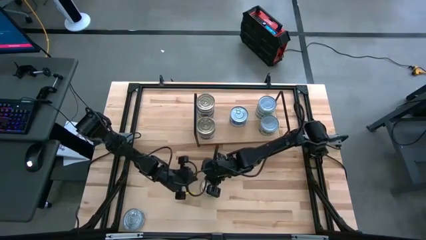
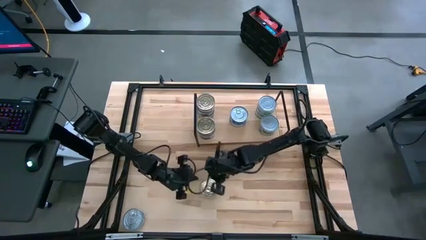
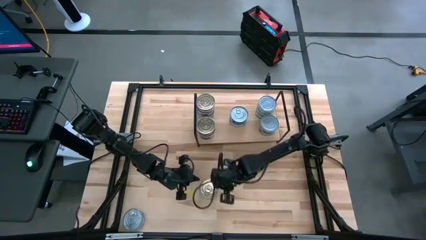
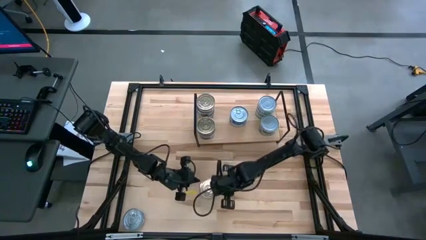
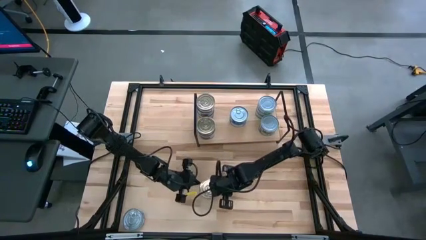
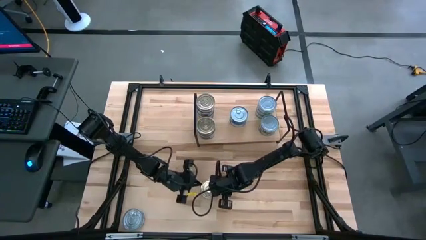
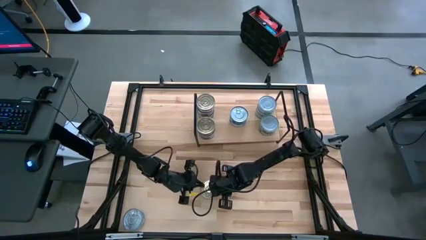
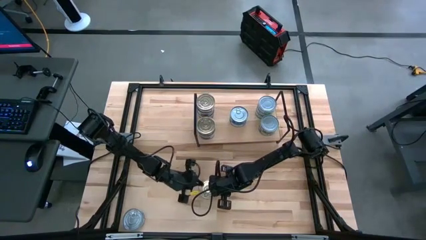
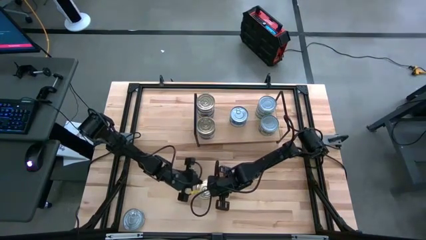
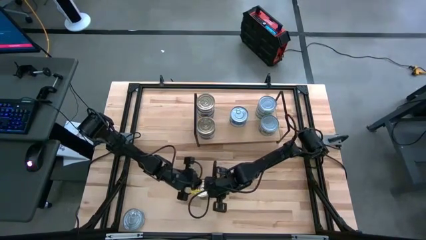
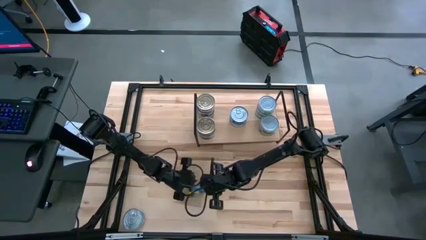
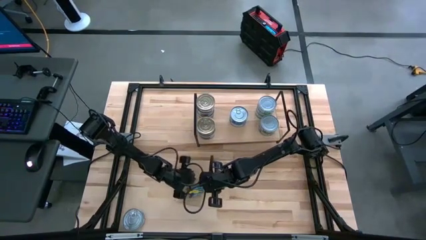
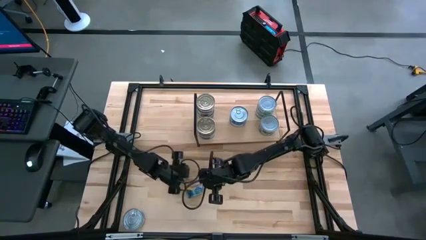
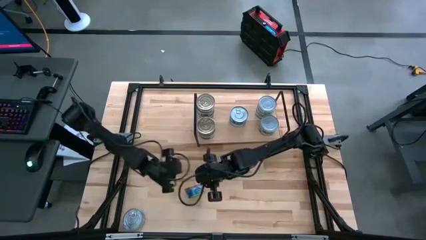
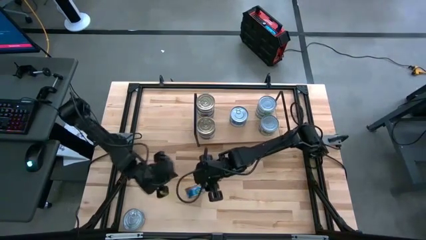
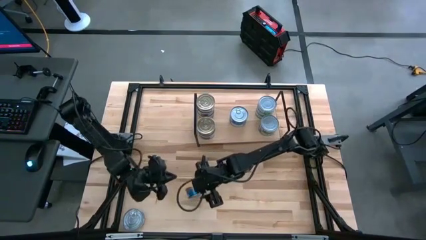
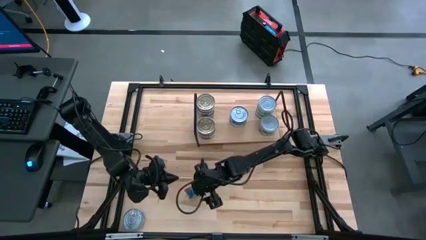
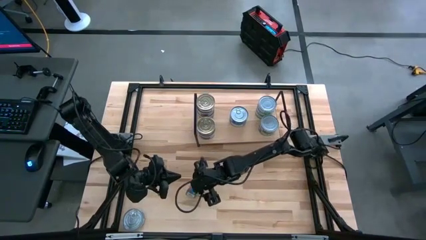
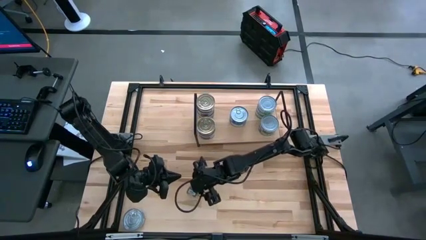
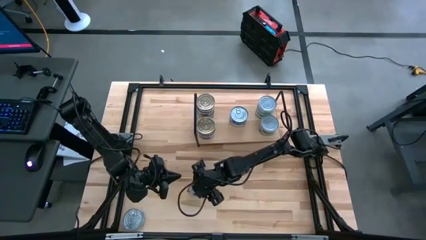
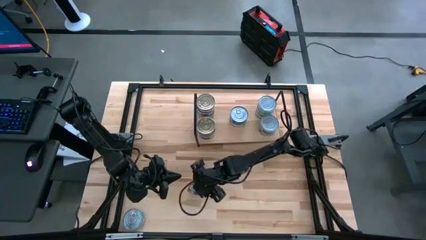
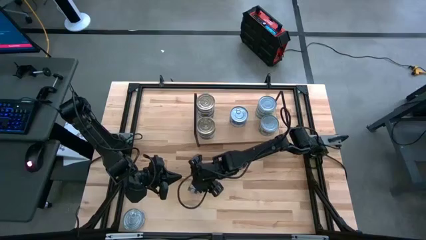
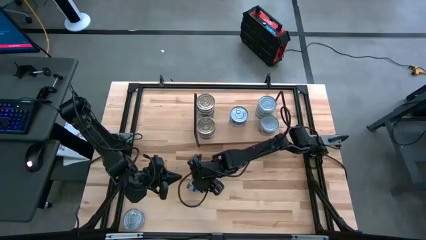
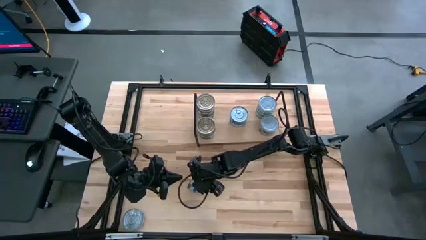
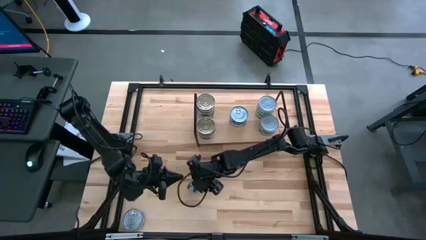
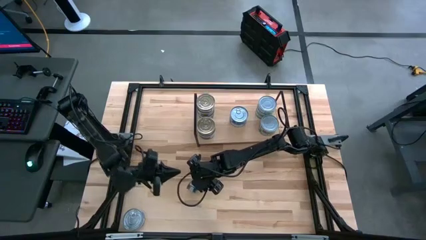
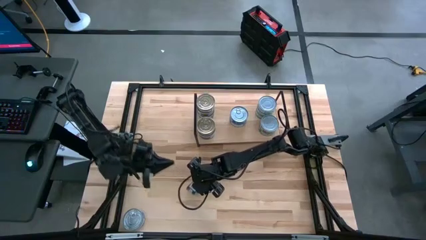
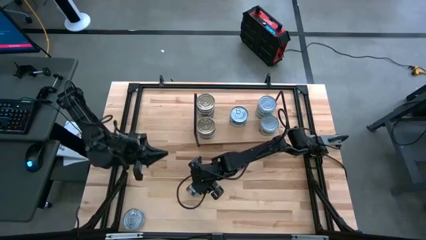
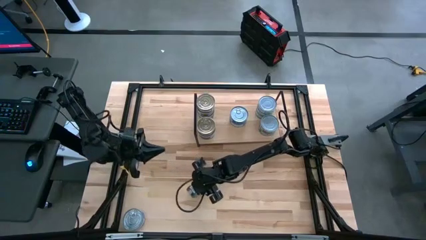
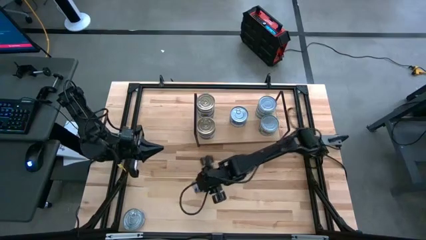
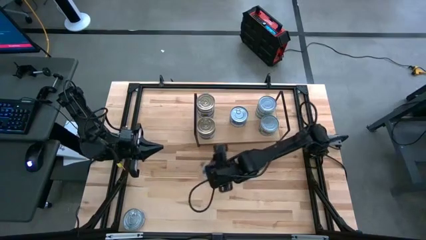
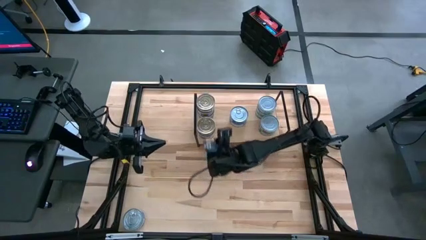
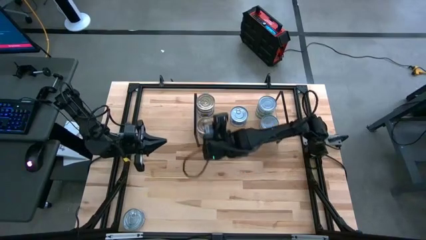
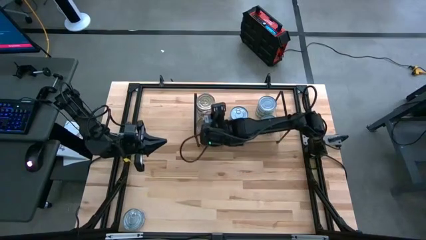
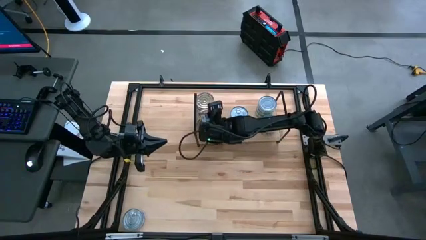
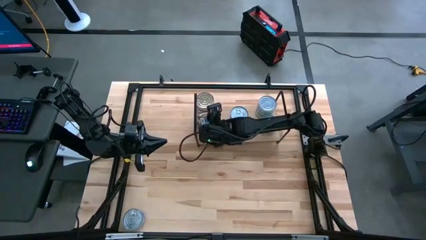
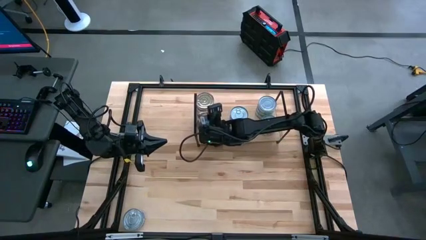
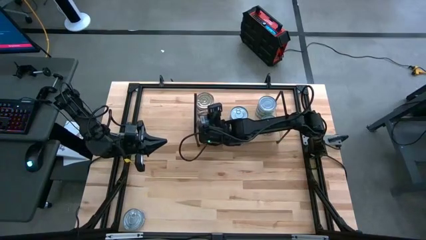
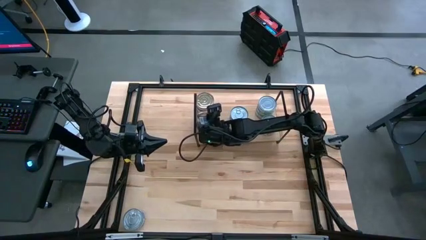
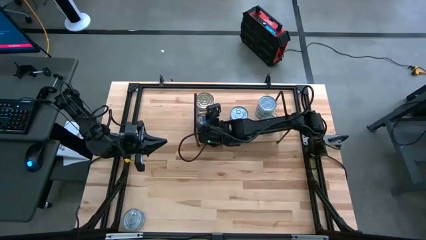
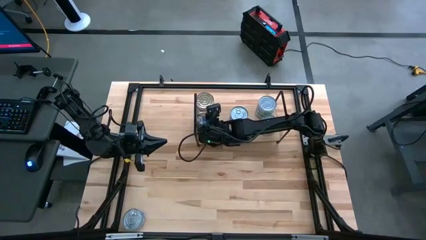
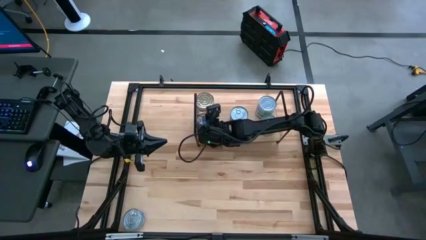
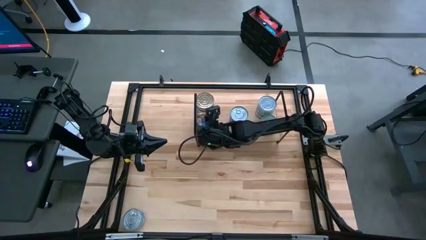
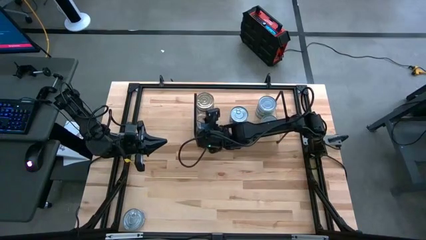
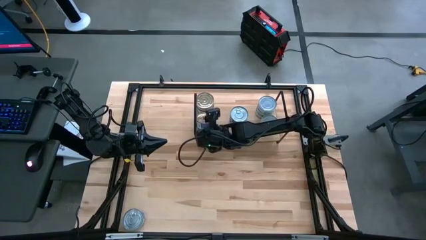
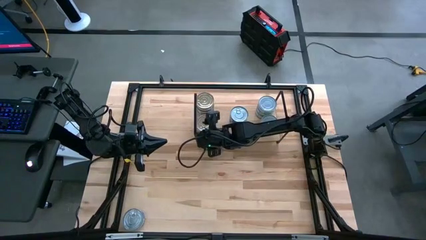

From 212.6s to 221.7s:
Task: Stack canned seafood by type on shelf
Stack the blue-pink tuna can on top of the other blue-pink tuna can on the shelf

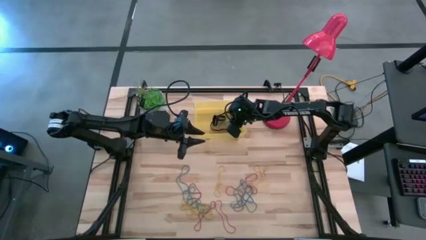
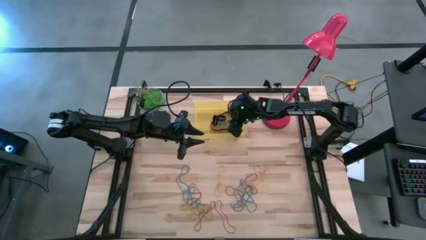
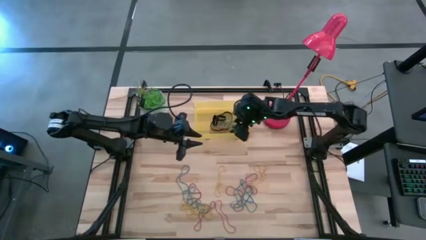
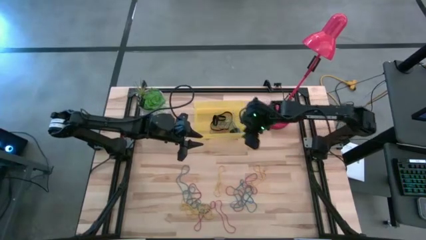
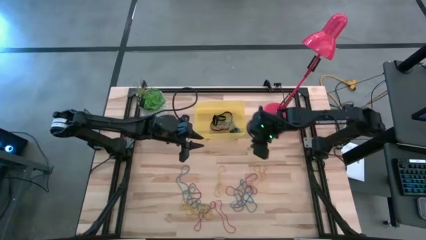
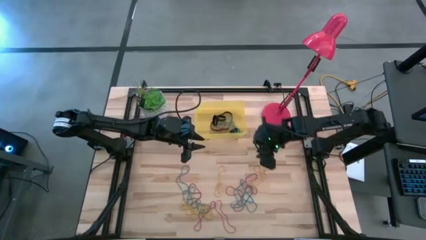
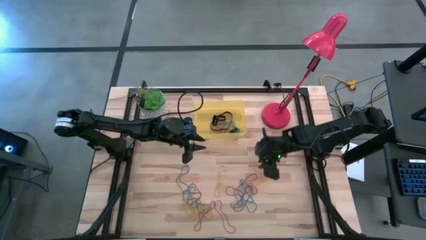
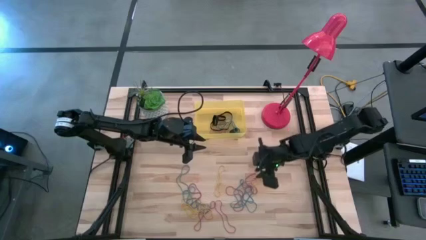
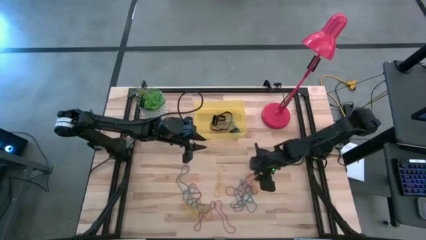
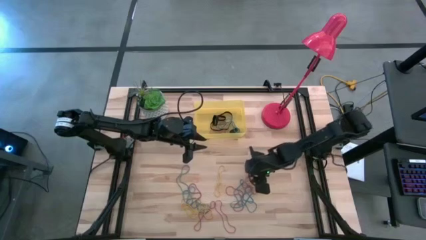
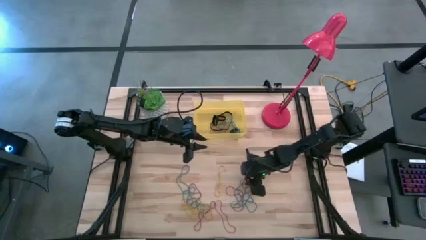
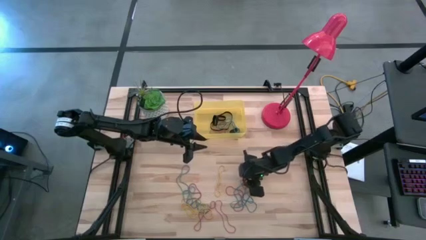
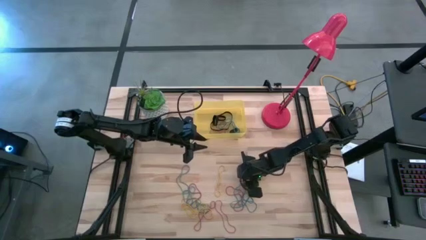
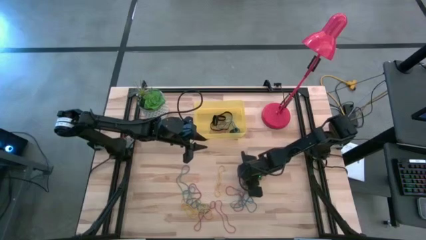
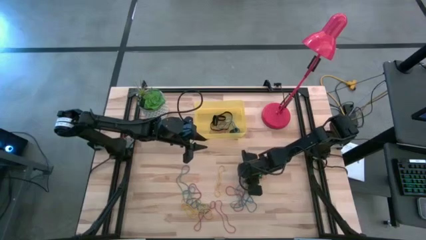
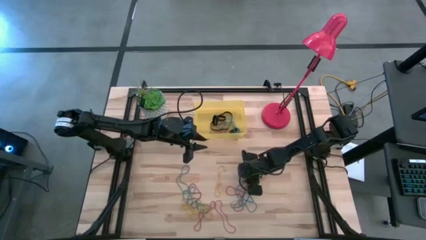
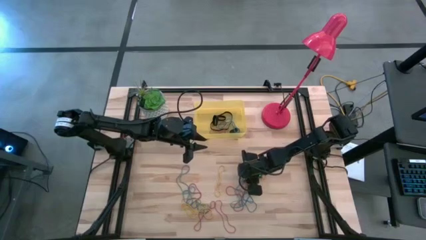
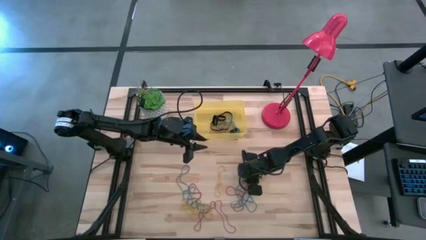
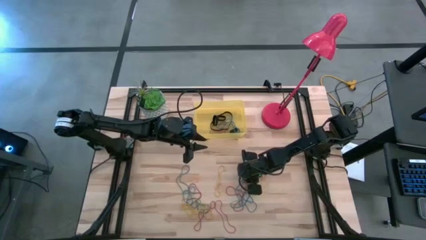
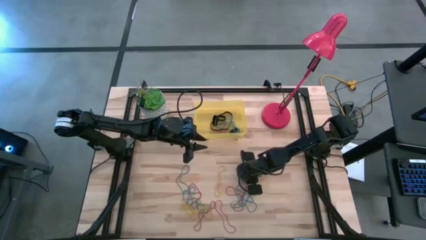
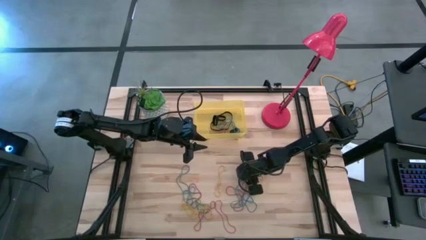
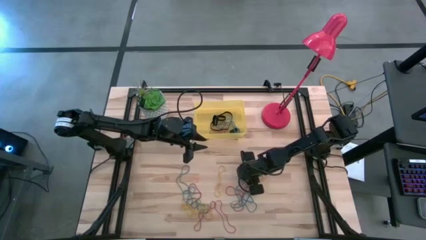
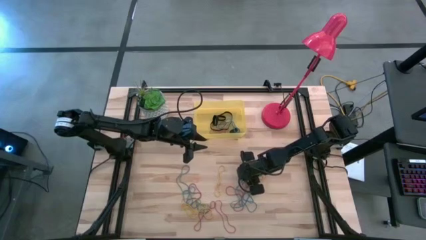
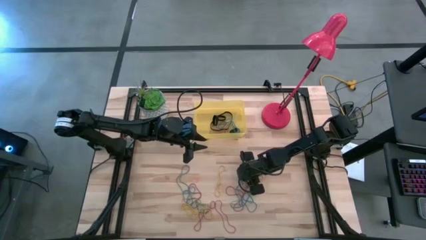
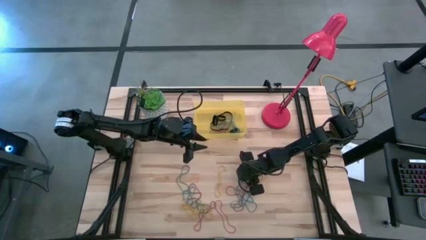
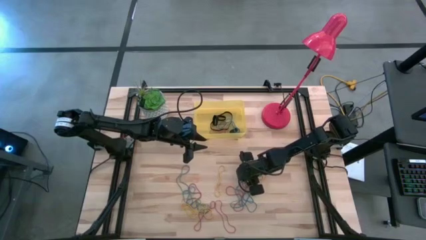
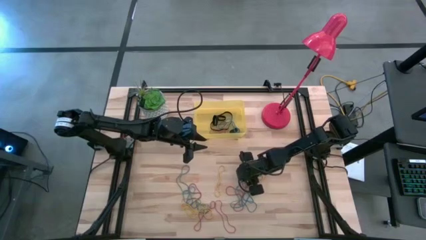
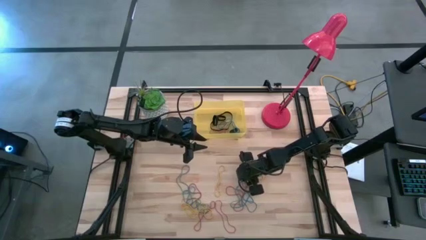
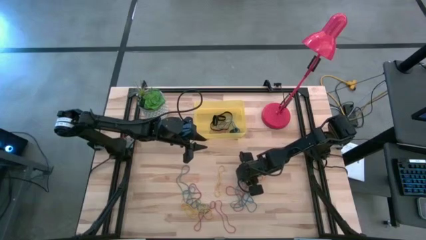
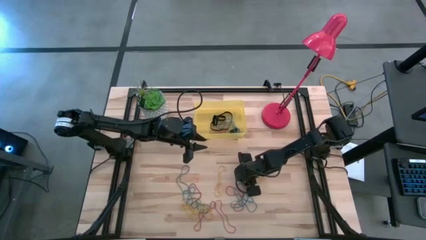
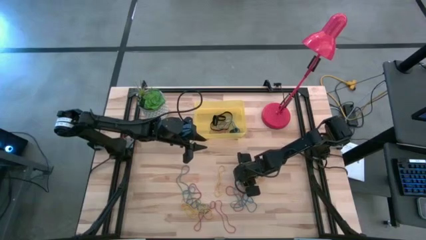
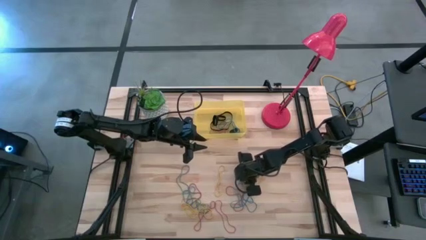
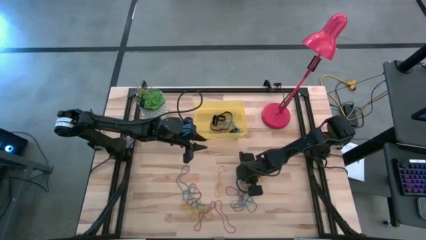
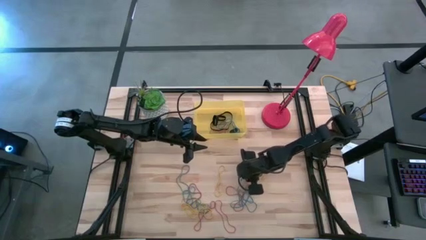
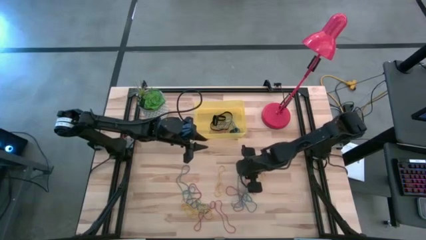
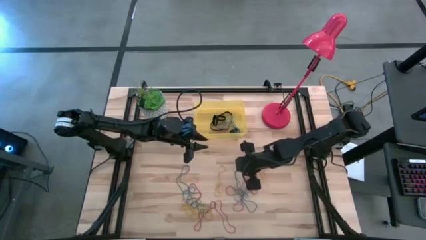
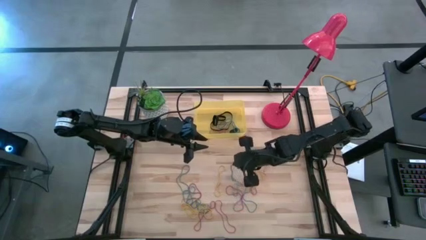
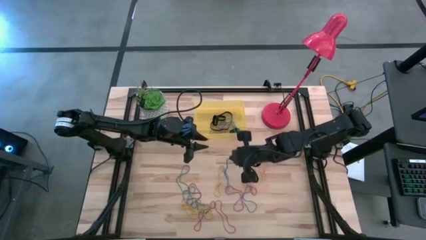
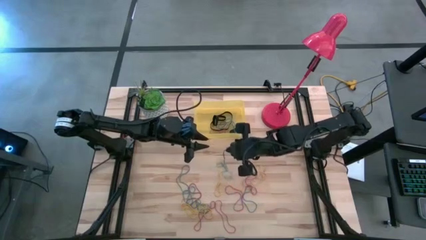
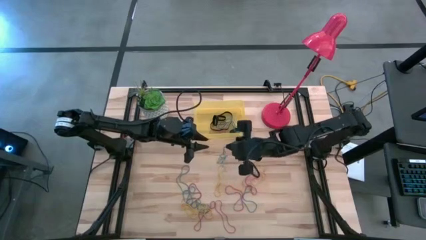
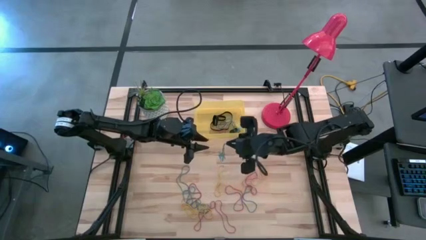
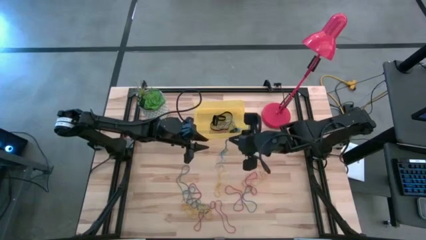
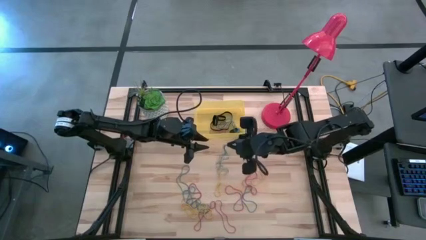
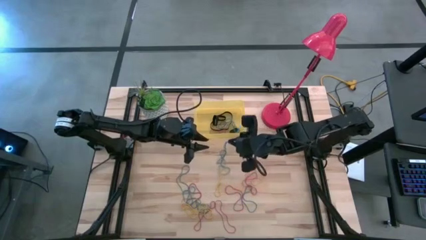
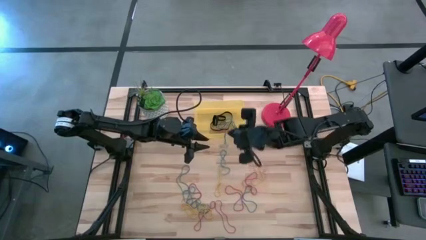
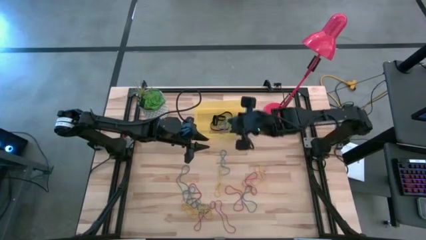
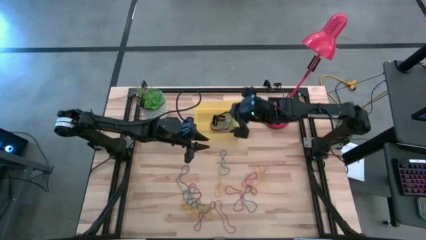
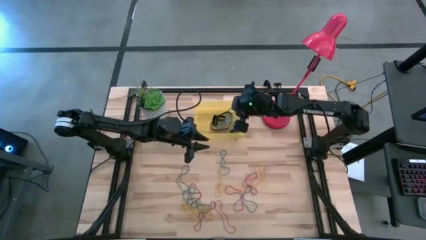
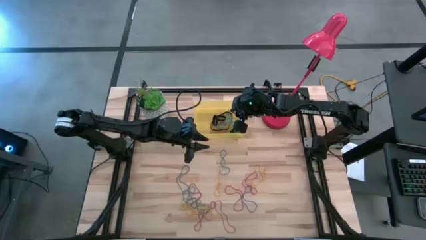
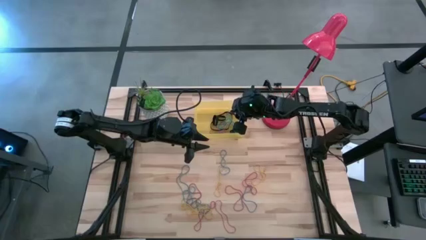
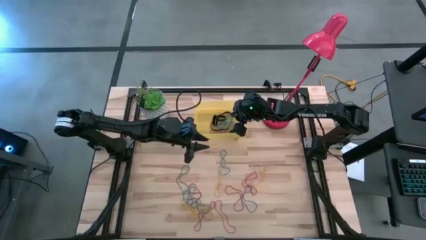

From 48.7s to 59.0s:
Task: Pick and place rubber bands into bin
Put the blue rubber band into the yellow bin
